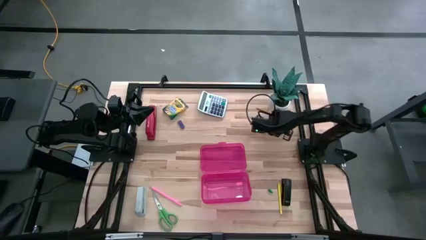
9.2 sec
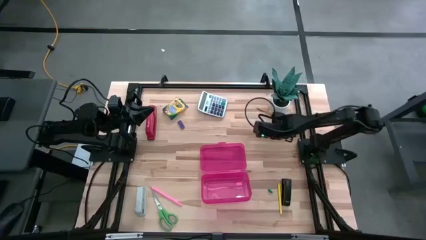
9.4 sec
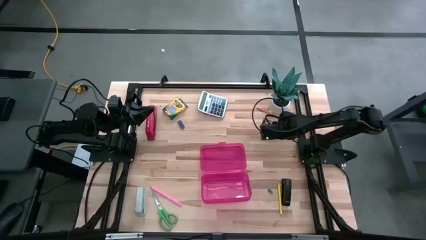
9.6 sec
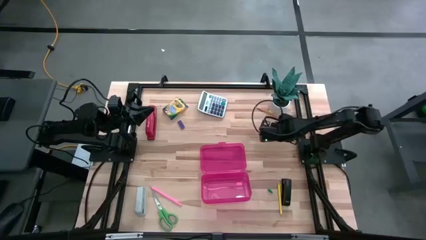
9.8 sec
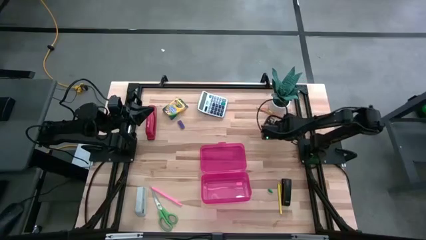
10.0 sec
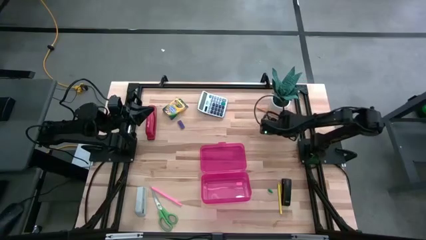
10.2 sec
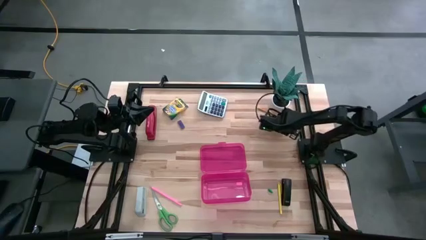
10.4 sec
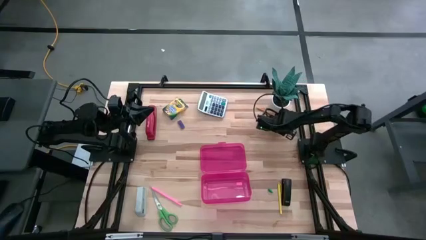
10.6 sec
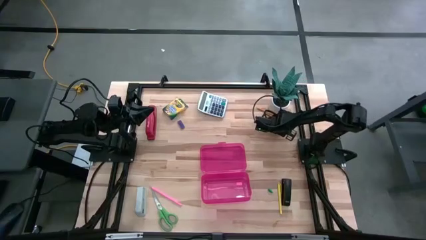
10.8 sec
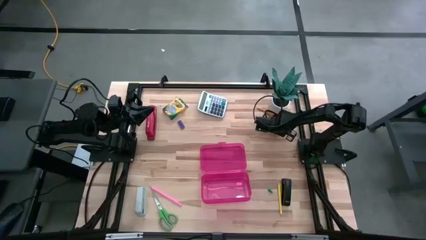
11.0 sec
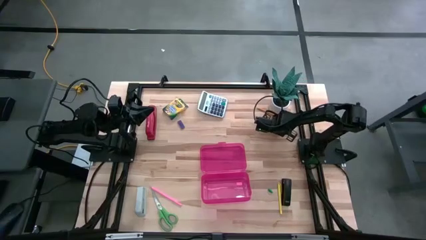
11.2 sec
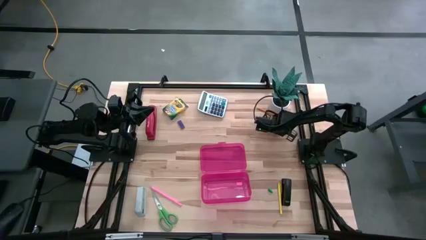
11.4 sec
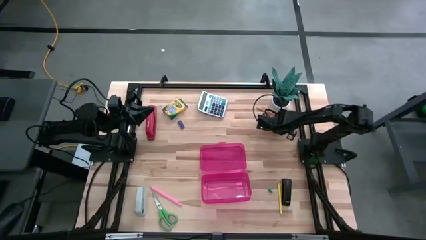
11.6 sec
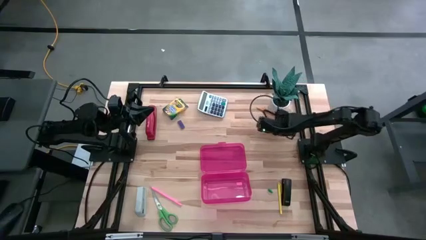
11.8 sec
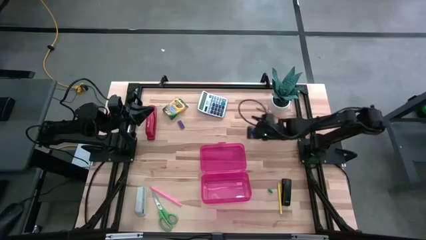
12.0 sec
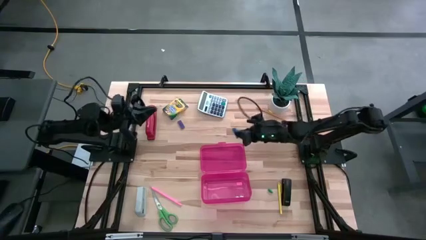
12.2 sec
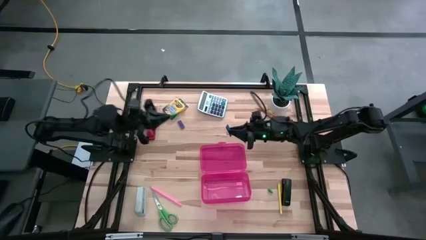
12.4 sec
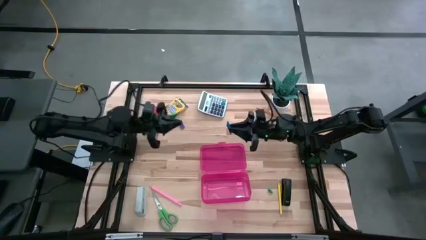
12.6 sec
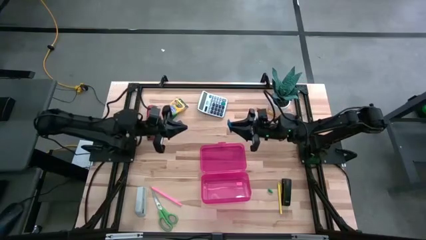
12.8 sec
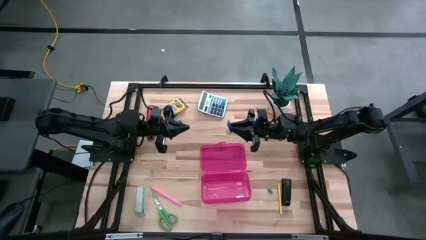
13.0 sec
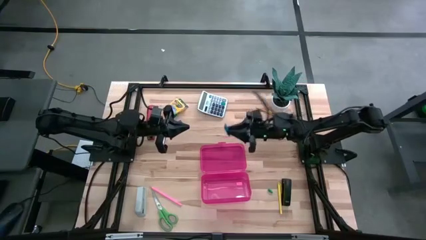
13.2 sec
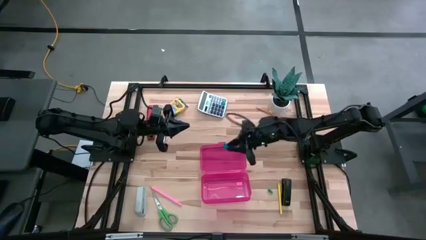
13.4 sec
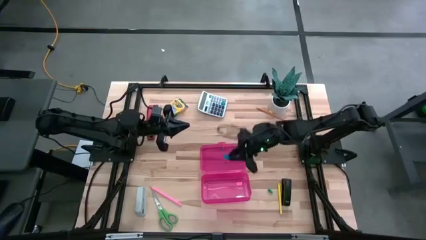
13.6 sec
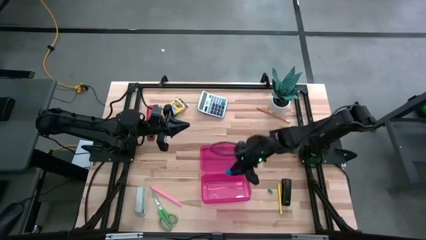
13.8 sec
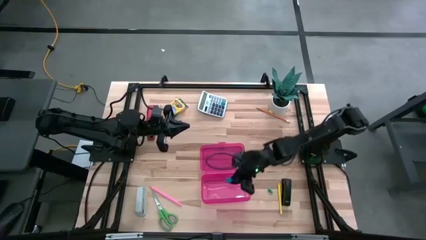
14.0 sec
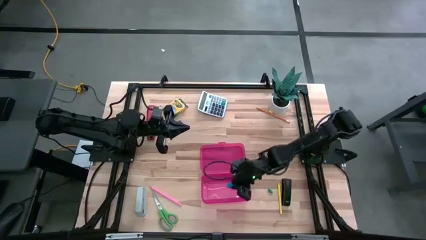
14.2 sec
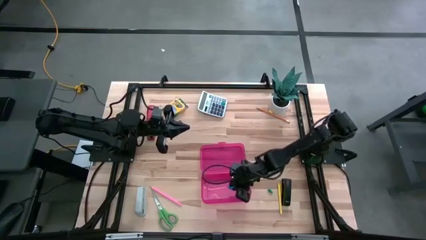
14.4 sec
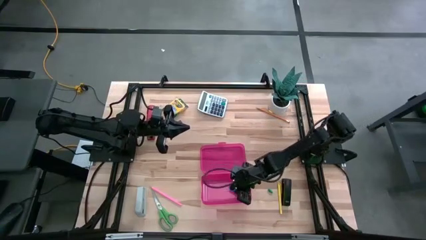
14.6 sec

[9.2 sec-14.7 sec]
Task: Pack school essentials
Put the blue eraser into the pink supply box

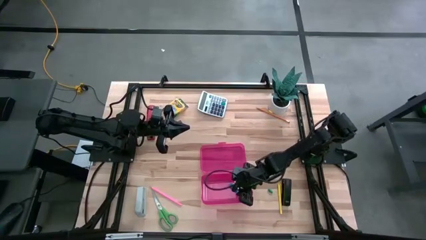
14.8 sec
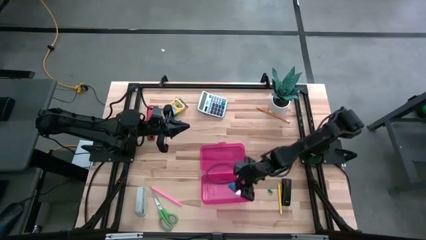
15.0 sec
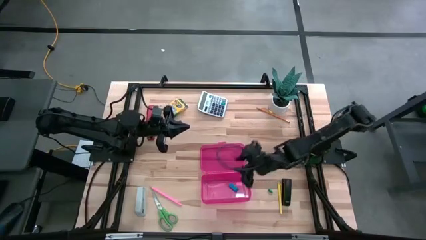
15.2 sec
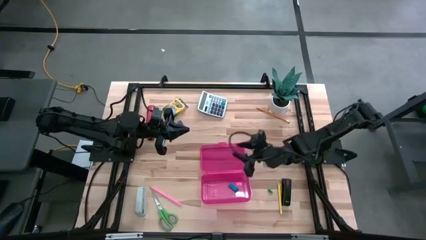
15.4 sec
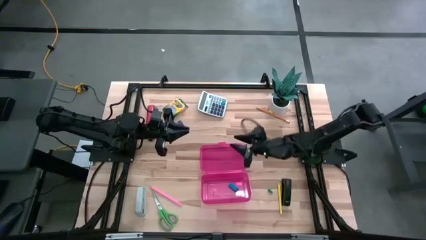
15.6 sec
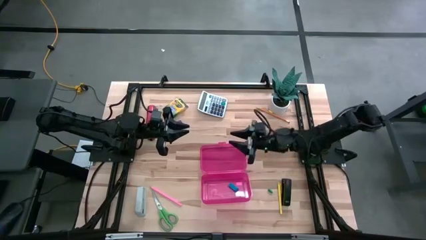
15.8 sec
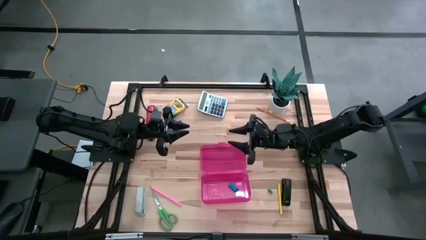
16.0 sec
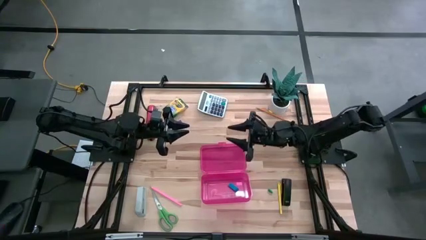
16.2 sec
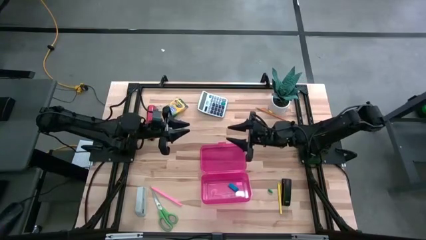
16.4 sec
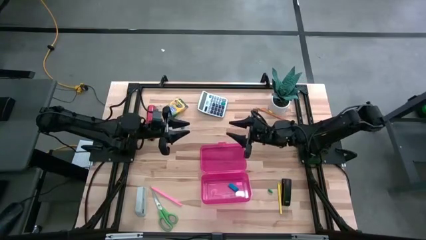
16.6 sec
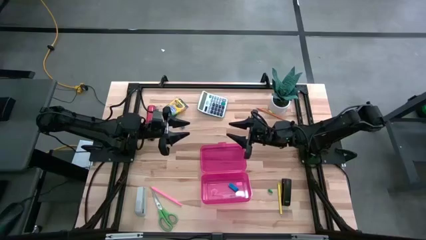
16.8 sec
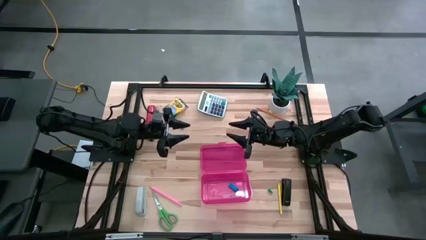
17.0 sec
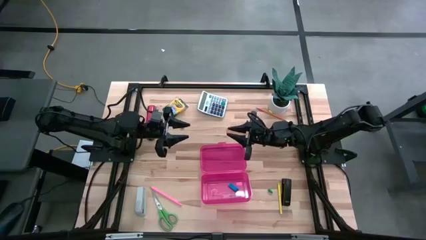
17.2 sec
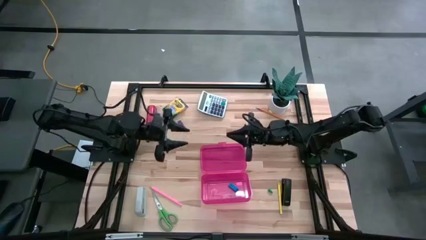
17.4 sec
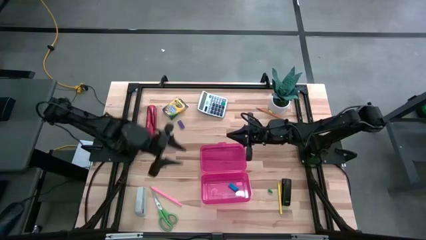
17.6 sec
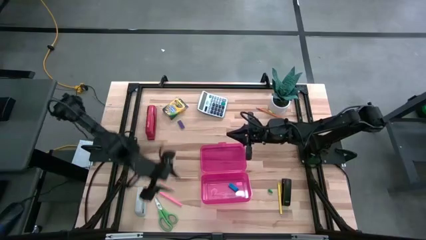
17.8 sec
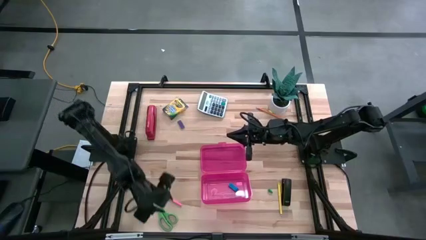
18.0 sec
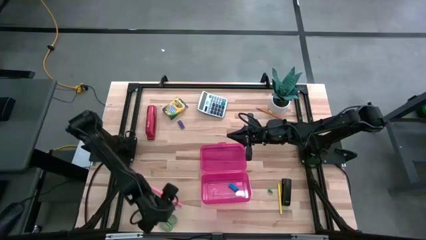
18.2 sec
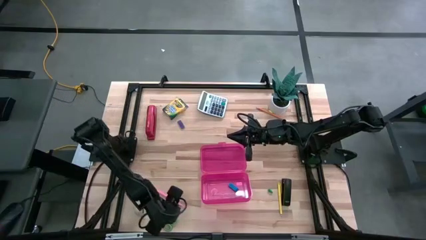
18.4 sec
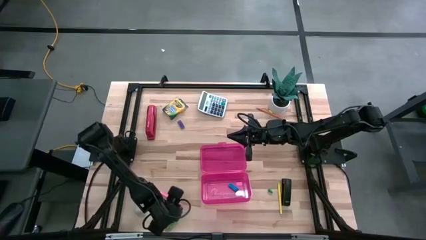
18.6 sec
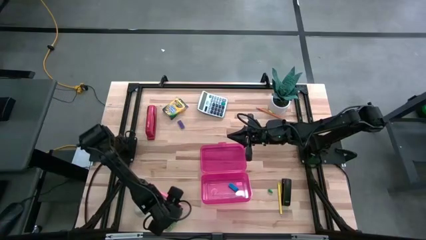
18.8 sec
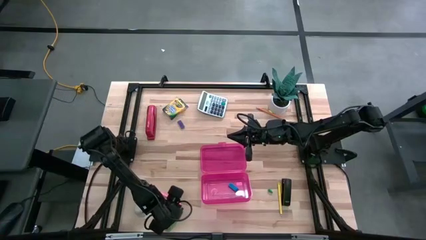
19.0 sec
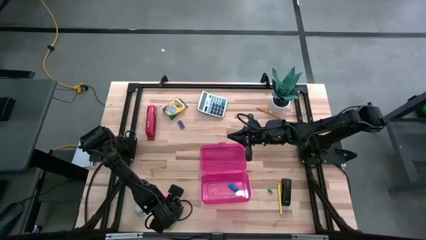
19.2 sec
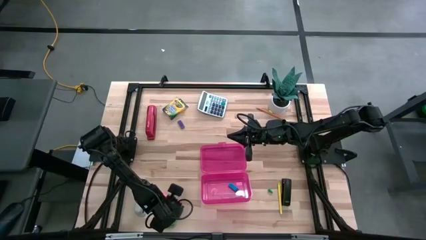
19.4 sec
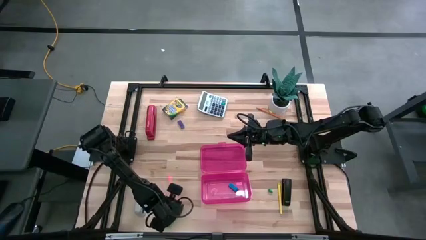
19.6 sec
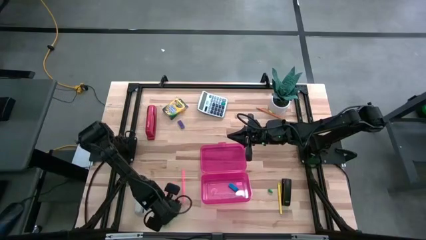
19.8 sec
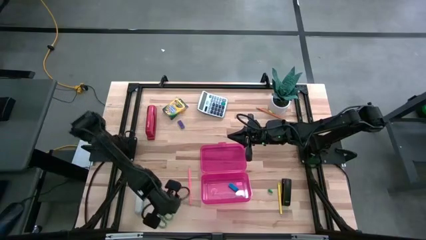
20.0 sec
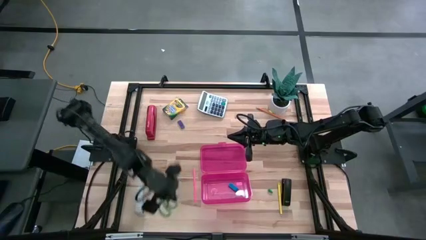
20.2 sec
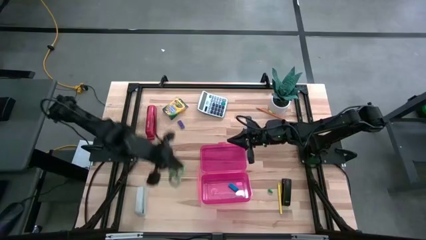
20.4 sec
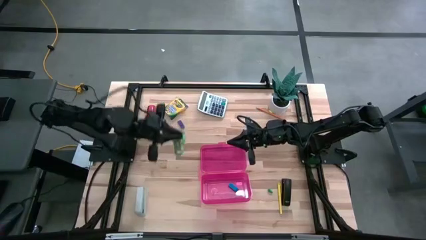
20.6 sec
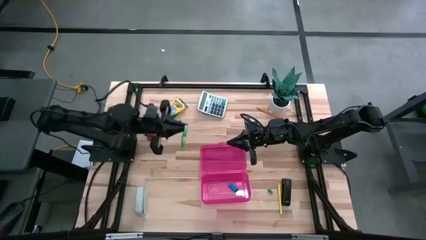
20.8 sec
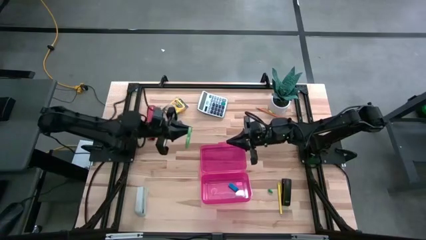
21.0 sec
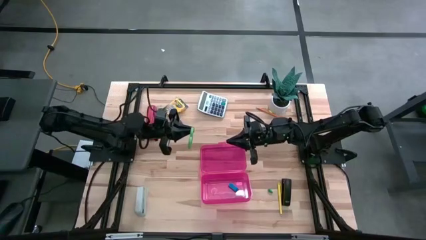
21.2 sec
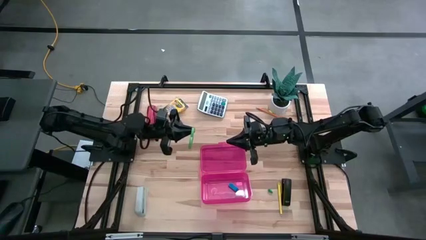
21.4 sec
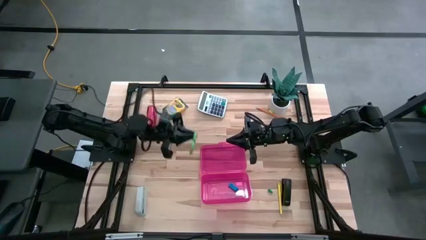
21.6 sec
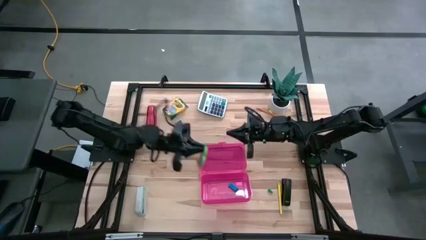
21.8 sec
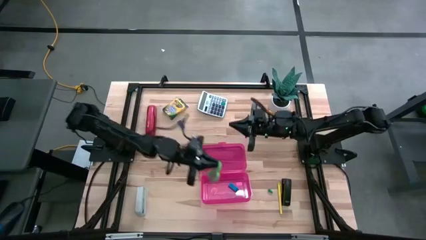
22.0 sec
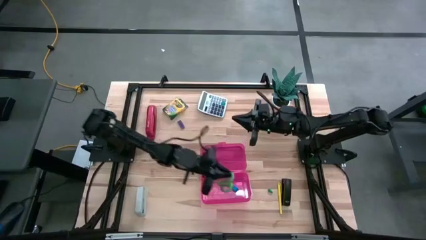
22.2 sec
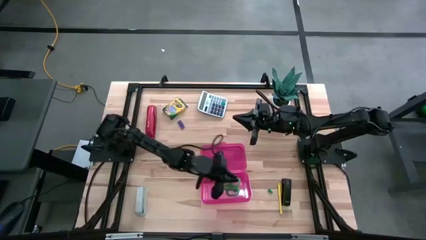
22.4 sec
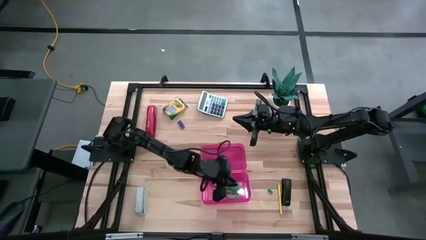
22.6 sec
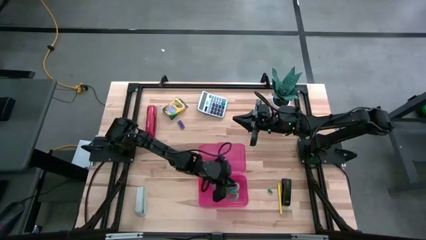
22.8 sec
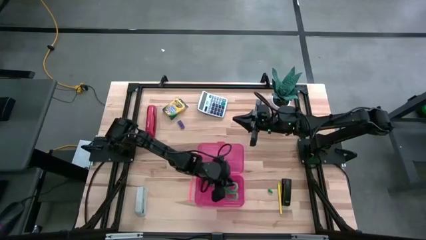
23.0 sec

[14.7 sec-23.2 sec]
Put the green scissors into the pink supply box

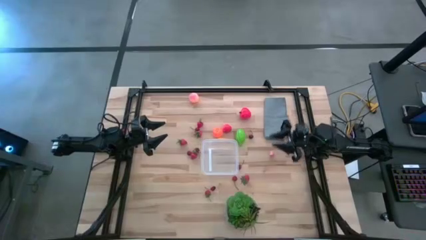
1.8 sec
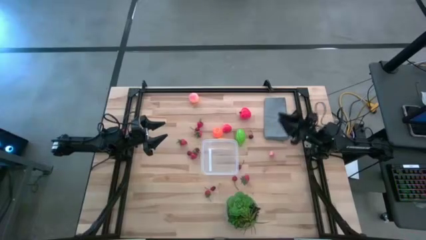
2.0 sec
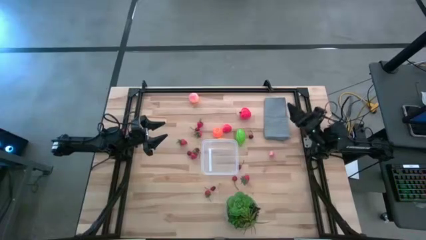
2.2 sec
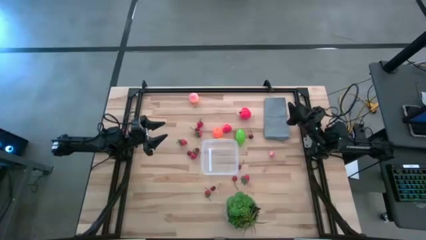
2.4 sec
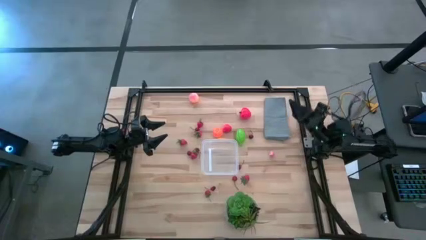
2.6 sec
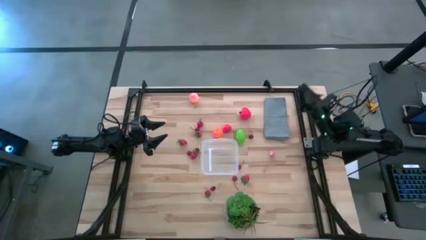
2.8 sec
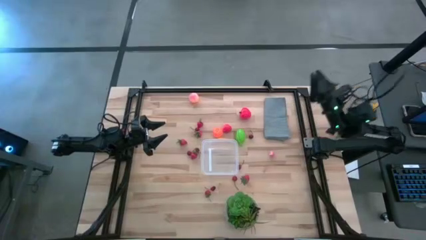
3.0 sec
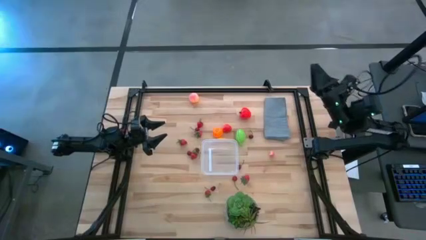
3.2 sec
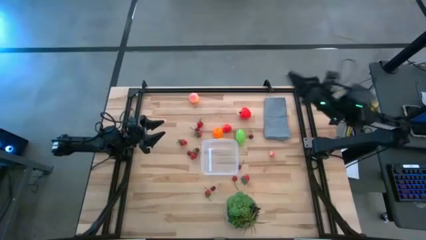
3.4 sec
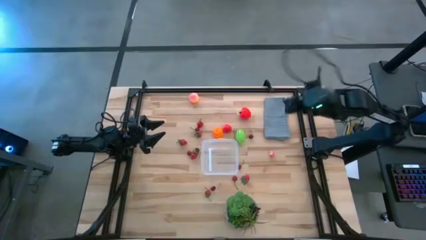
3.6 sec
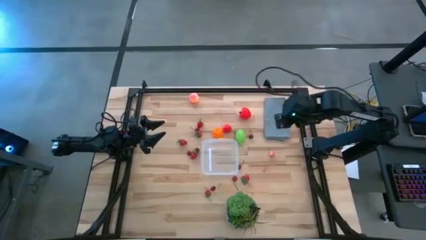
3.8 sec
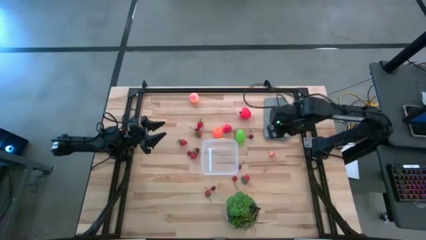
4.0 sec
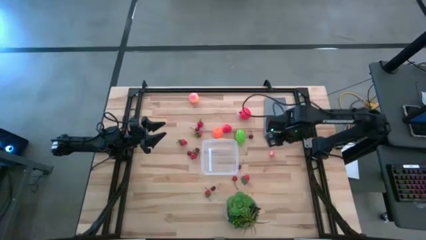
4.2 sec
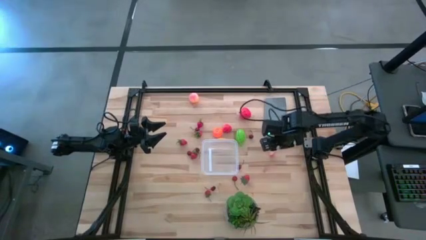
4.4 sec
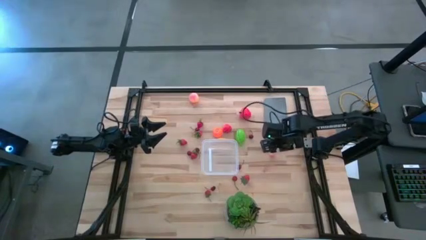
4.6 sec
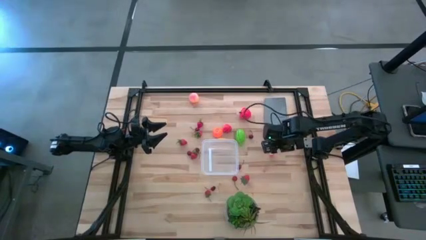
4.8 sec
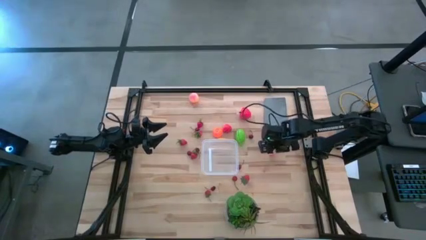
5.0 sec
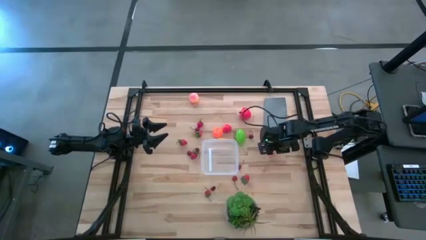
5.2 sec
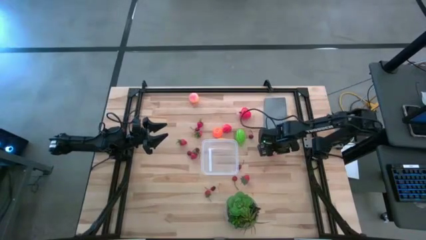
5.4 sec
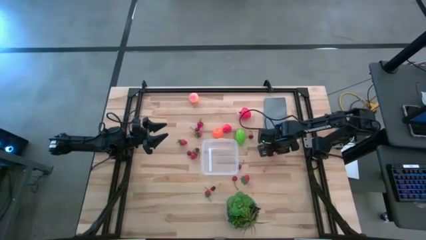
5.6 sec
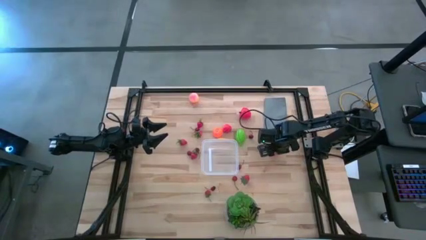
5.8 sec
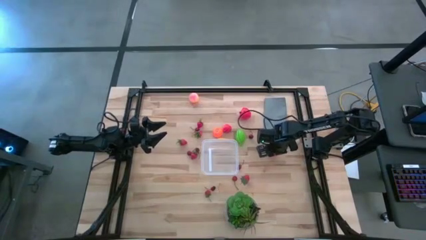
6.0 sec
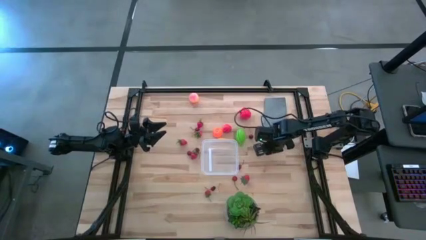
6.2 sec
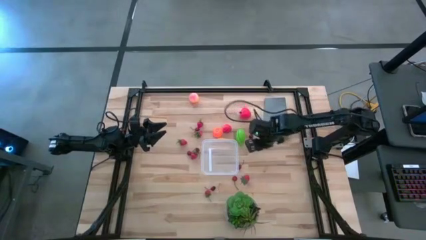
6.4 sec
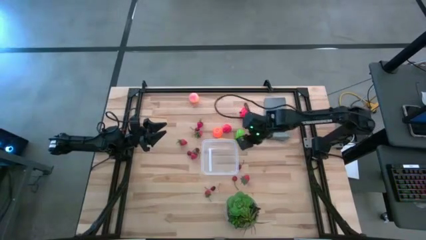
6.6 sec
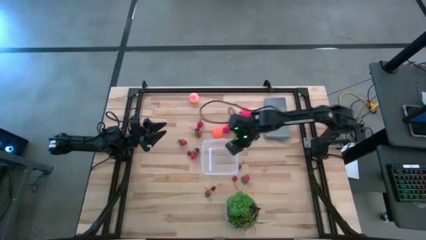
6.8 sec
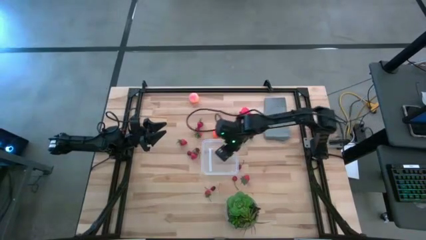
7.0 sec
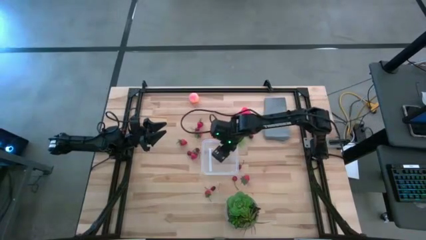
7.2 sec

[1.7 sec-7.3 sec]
Task: Pick and placing Produce into tupperware
Put the pink peach into the transparent container
